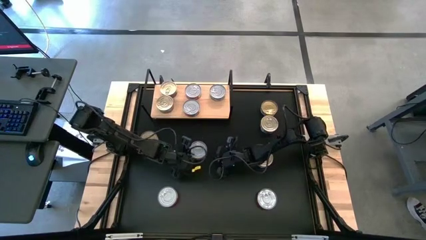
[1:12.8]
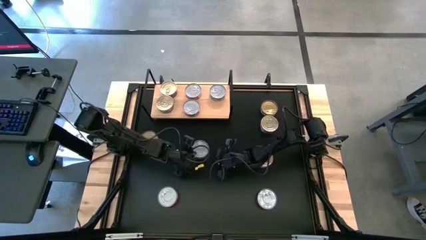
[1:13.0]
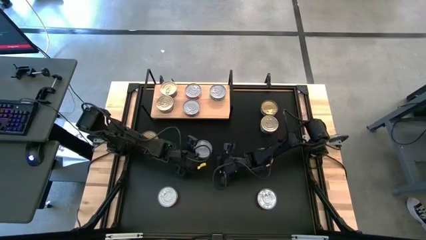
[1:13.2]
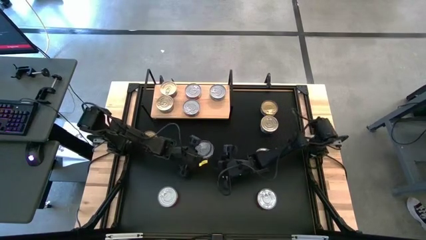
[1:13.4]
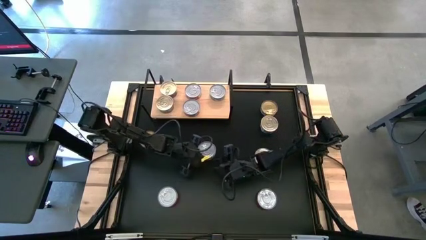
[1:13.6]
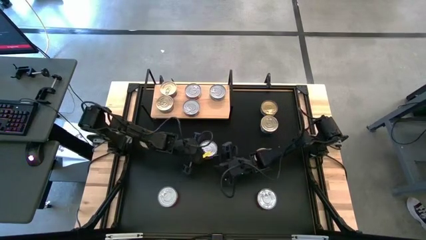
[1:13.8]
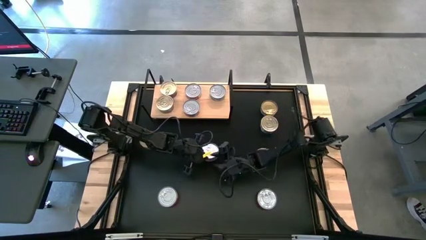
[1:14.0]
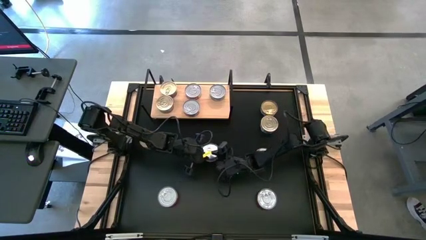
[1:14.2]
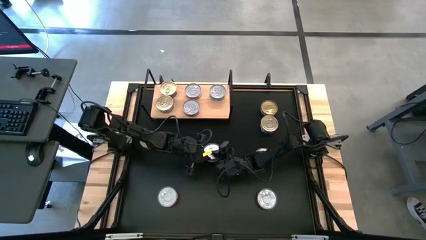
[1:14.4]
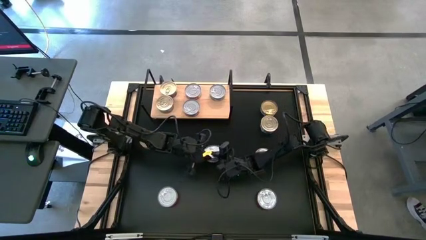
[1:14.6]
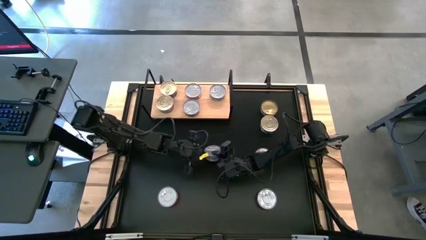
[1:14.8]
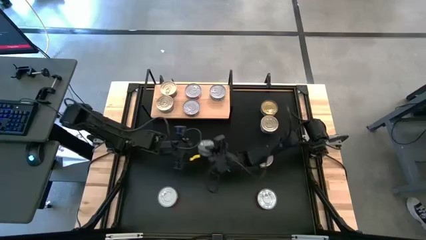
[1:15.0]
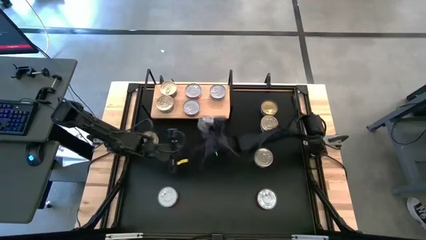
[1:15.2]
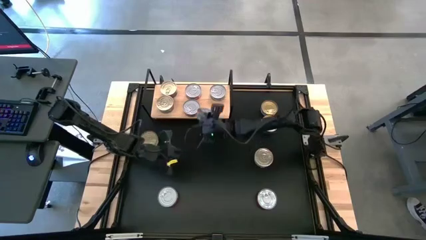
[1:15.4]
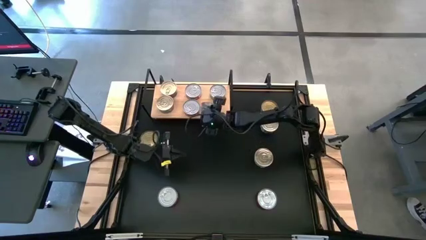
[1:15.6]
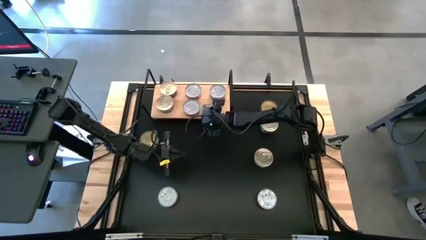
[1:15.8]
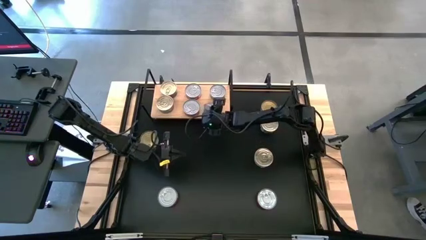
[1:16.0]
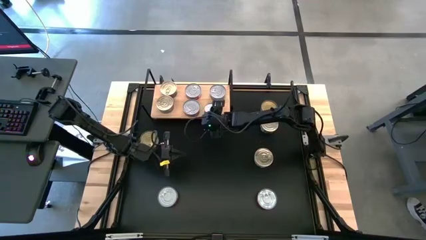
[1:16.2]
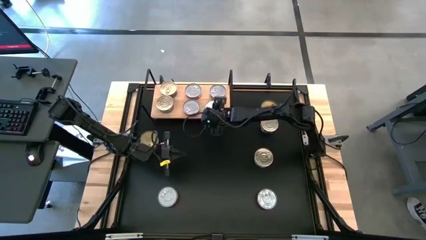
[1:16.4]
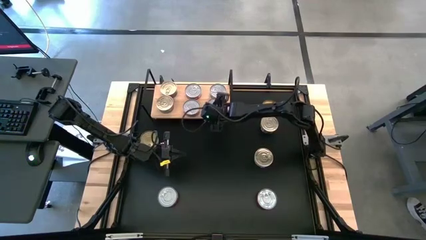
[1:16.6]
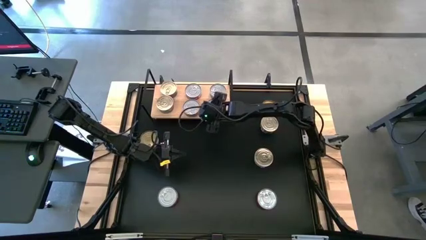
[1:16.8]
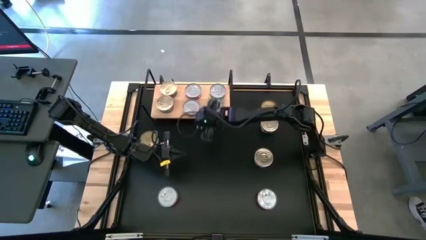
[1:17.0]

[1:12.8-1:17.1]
Task: Stack canned seafood by type on shelf
Put the bottom right green tuna can on the shelf and align it with the other green tuna can

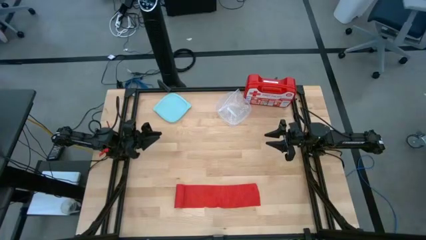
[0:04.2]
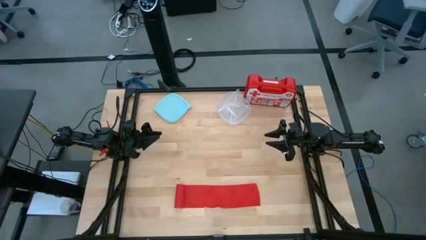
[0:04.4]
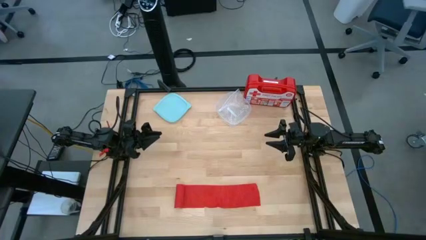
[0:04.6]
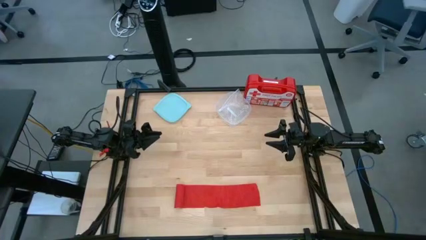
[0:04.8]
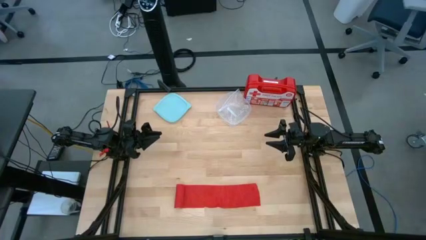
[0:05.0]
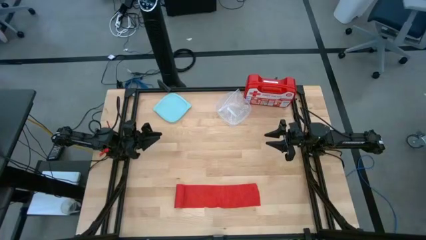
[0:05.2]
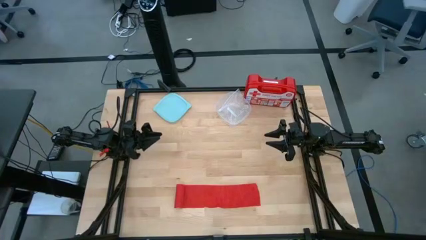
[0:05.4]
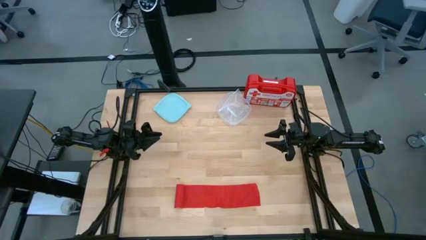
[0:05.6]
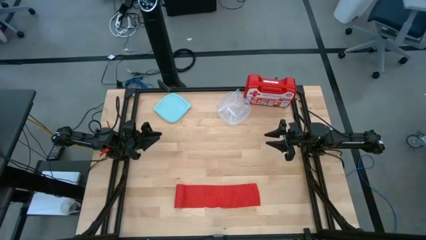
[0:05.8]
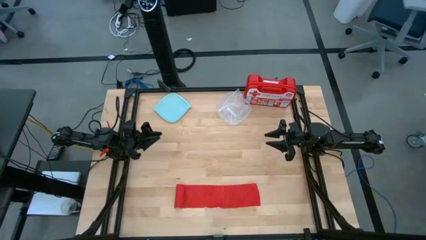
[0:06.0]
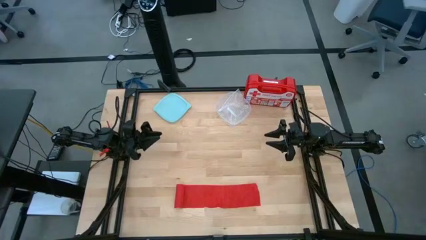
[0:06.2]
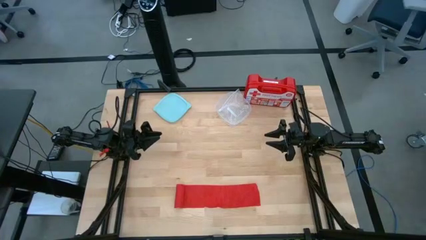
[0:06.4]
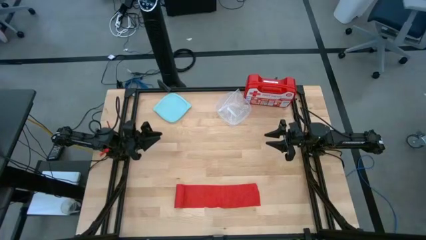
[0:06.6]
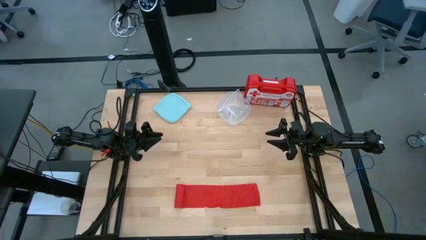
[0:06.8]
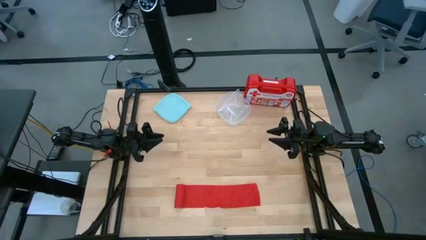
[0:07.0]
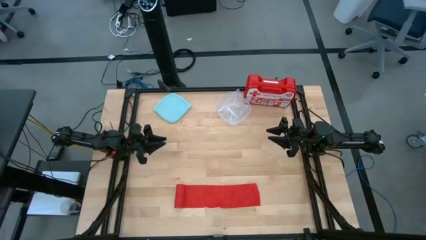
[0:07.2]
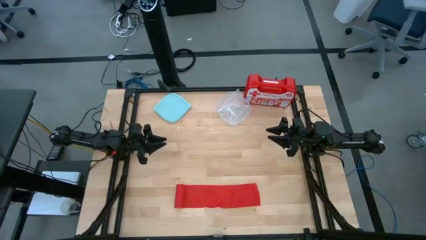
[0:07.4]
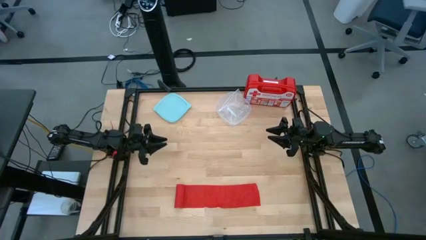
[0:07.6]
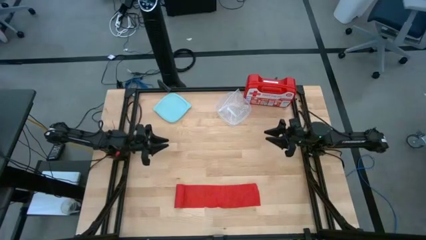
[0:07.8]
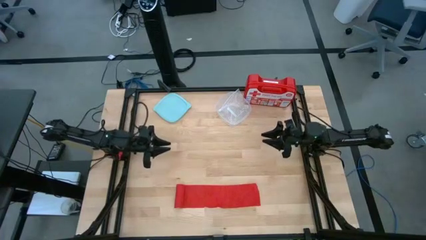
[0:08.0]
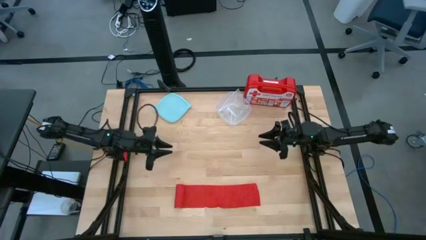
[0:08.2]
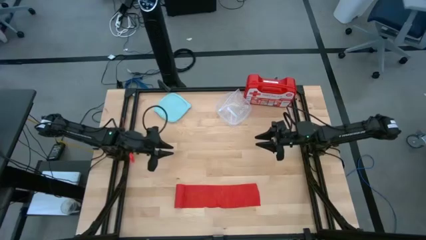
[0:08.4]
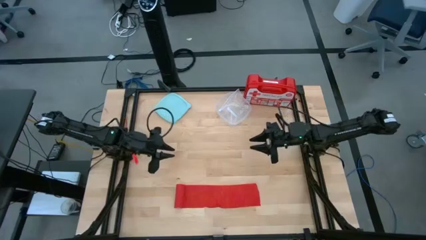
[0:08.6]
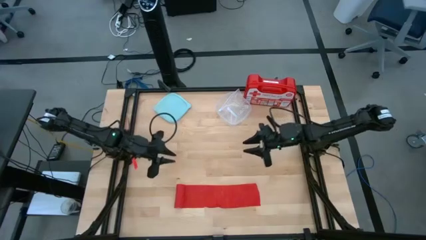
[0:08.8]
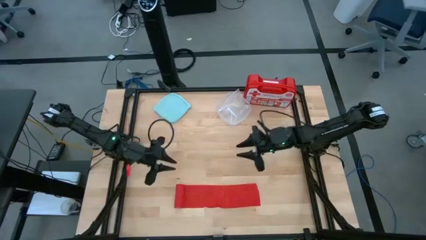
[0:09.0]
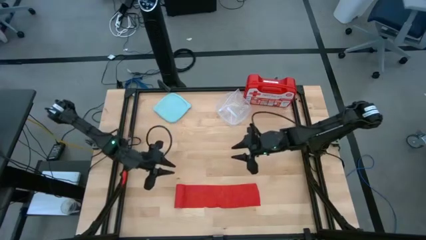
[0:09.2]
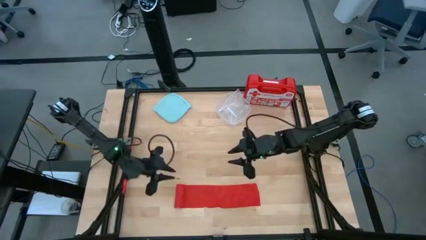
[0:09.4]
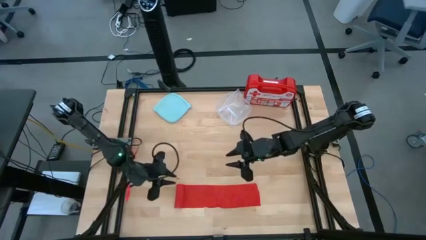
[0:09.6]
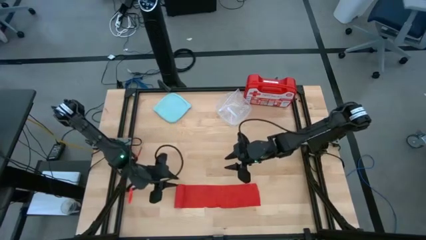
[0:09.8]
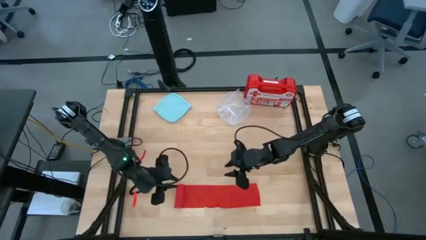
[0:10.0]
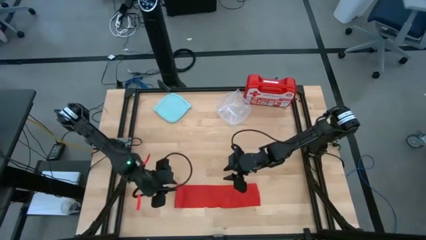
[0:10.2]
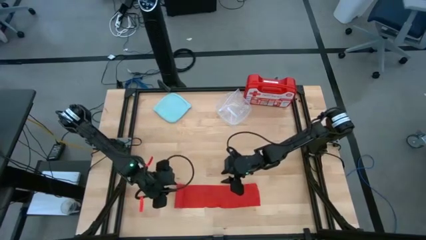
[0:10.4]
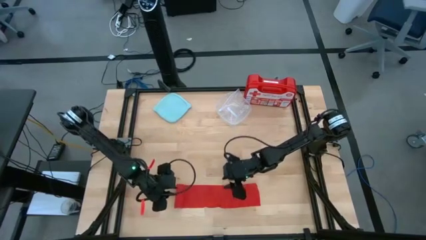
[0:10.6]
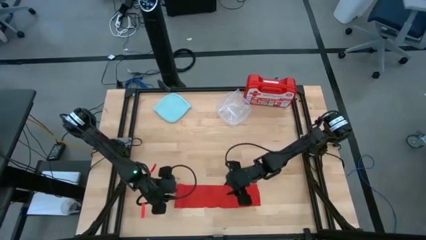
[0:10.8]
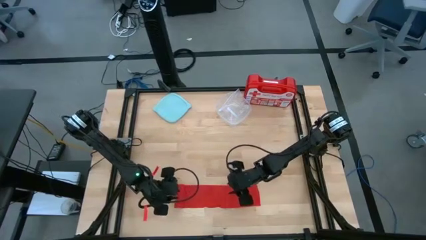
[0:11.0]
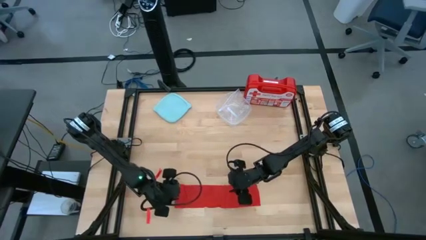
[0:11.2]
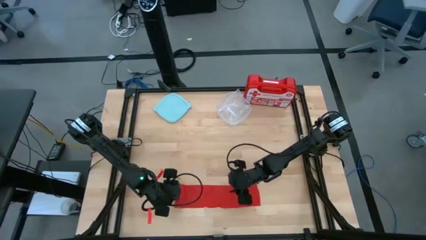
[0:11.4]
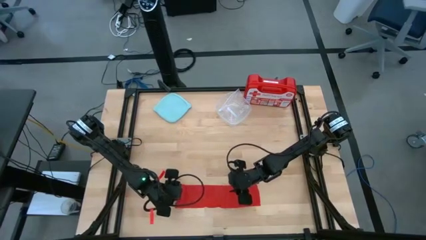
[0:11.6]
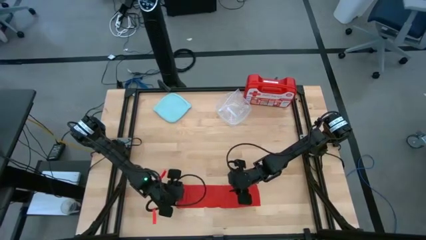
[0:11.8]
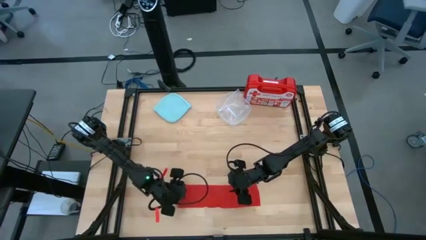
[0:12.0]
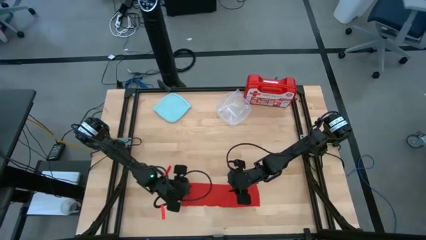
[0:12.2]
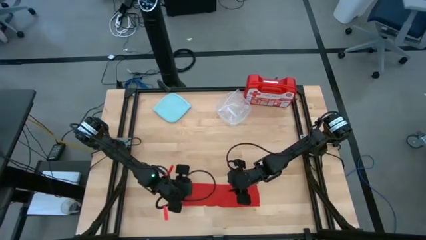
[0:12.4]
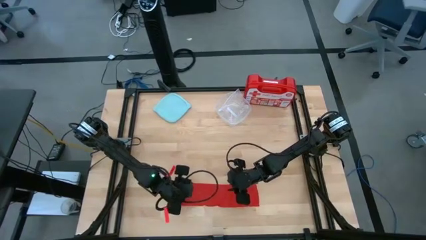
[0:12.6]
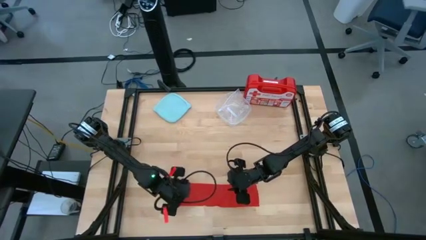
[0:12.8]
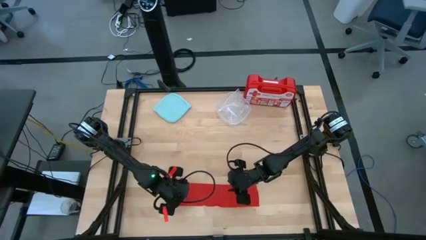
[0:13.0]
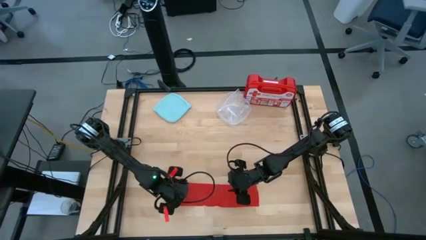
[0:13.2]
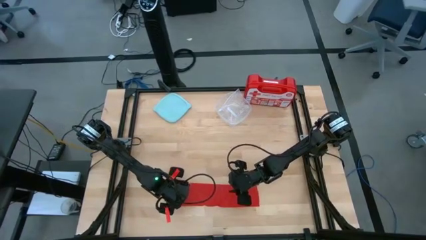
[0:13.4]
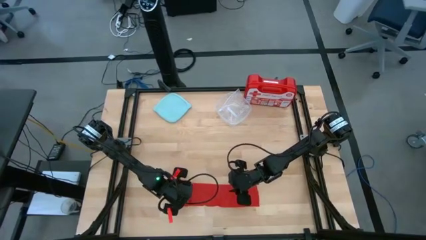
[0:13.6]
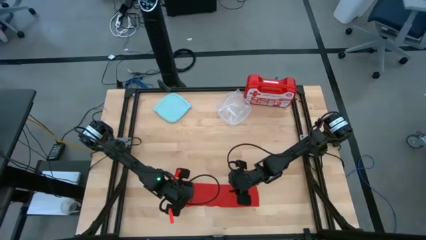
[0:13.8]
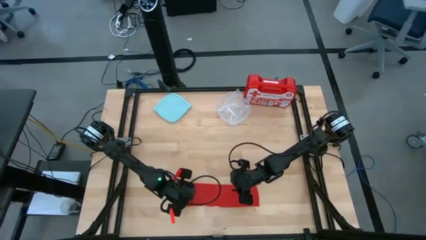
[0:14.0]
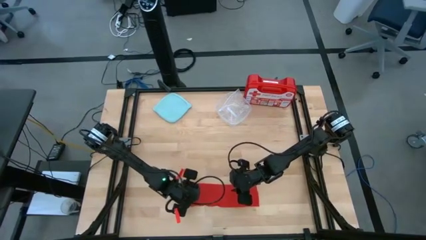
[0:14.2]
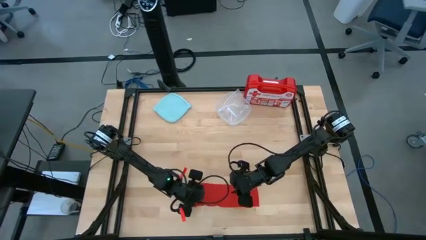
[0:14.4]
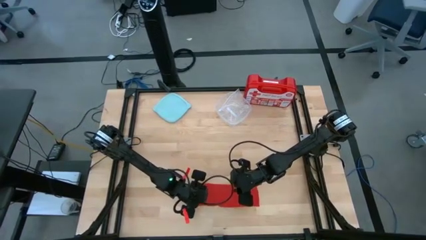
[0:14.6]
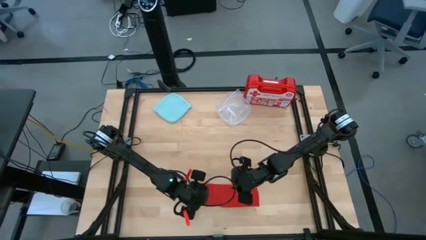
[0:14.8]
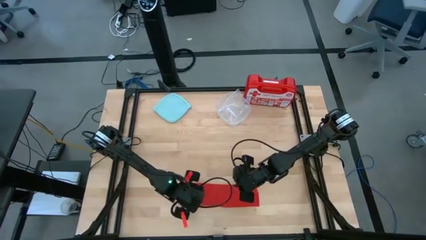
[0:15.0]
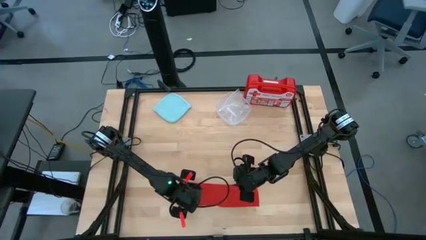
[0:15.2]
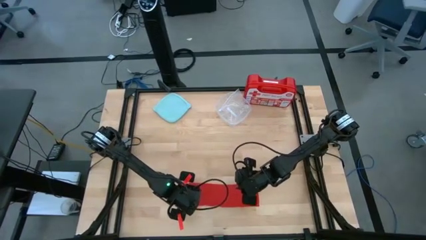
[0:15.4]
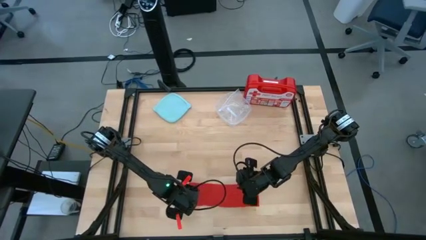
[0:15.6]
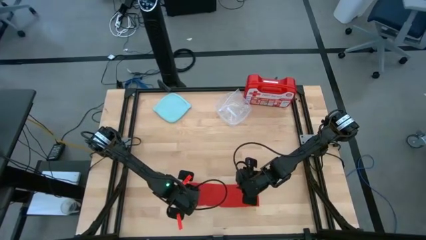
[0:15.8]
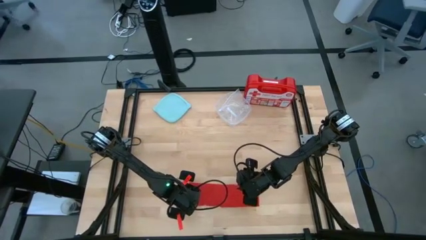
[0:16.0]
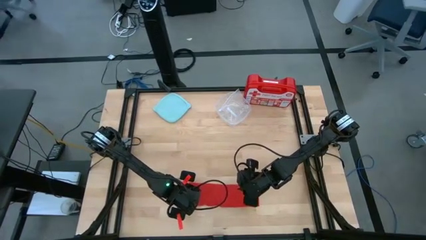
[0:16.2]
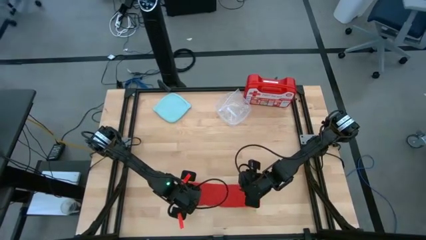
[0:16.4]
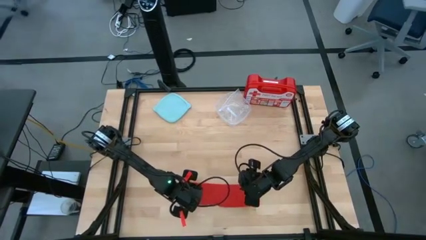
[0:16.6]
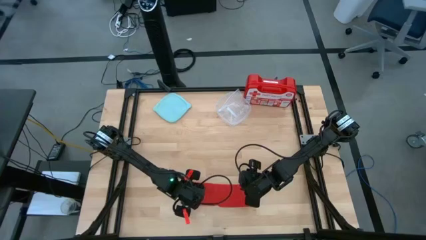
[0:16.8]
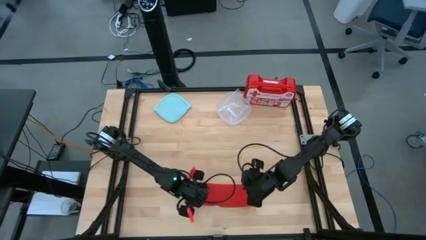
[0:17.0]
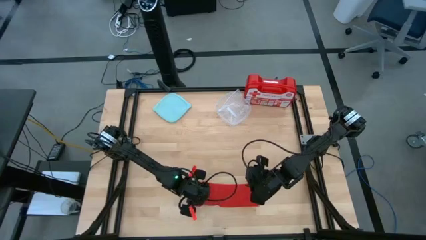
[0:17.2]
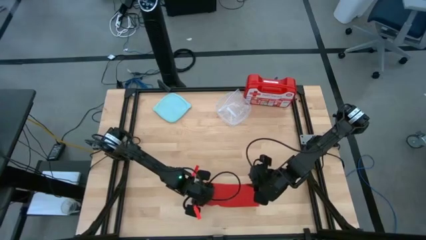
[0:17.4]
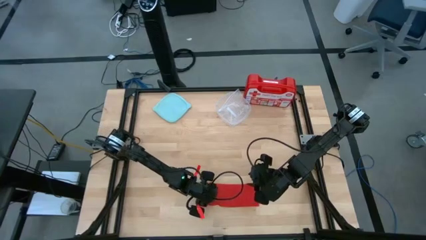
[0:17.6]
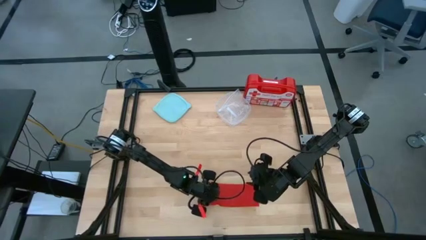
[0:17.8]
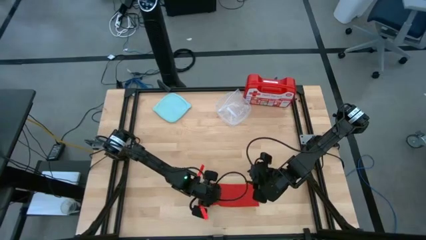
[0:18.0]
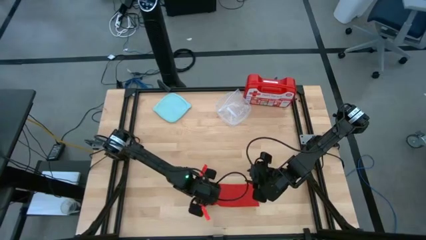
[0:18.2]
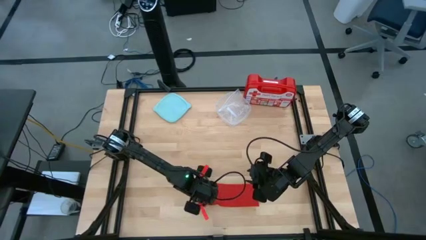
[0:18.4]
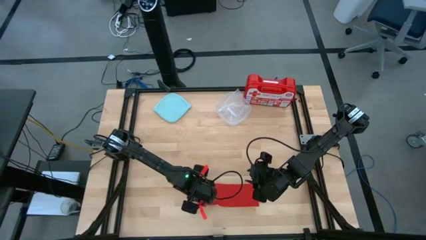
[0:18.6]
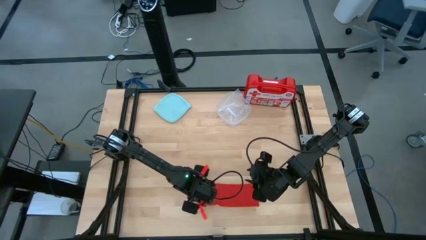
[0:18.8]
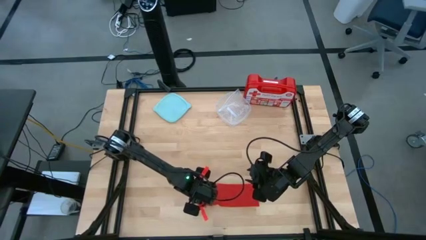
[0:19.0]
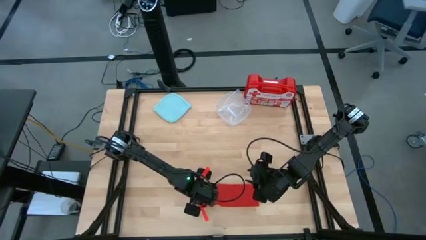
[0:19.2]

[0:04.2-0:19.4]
Task: Roll bandage
Roll the red bandage
